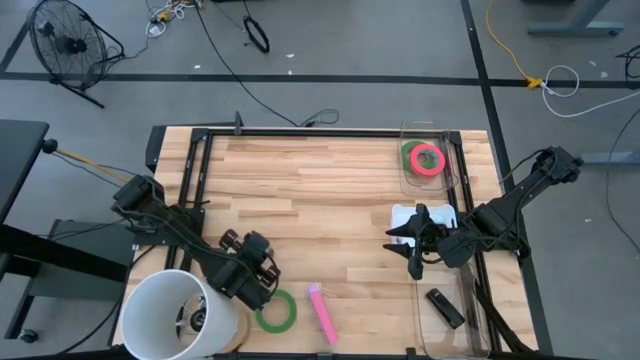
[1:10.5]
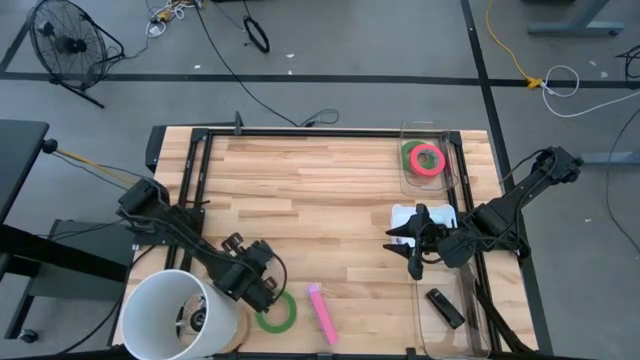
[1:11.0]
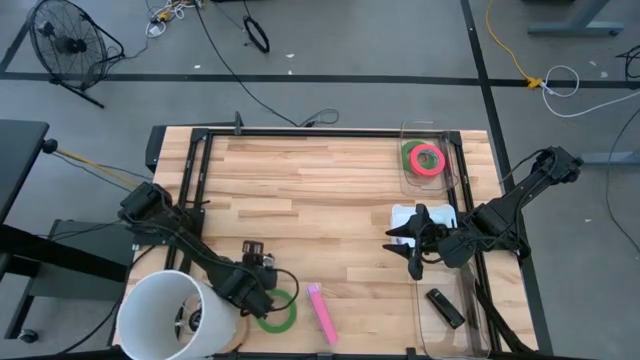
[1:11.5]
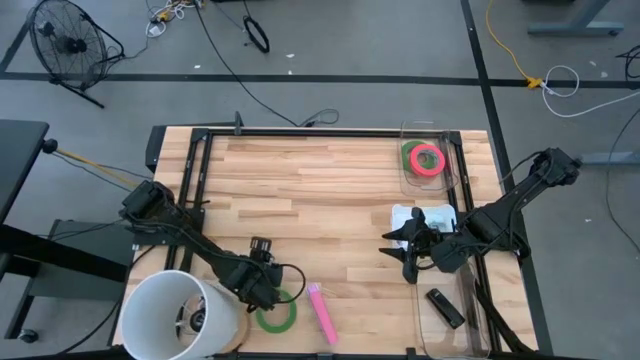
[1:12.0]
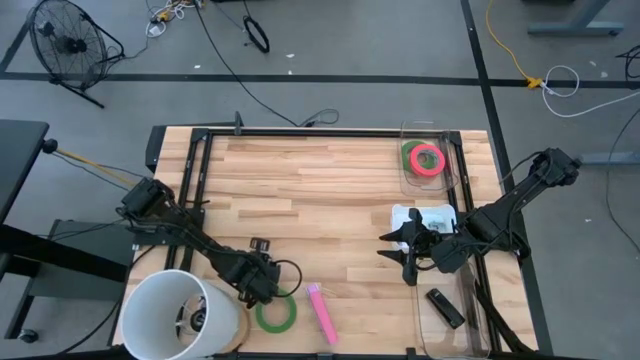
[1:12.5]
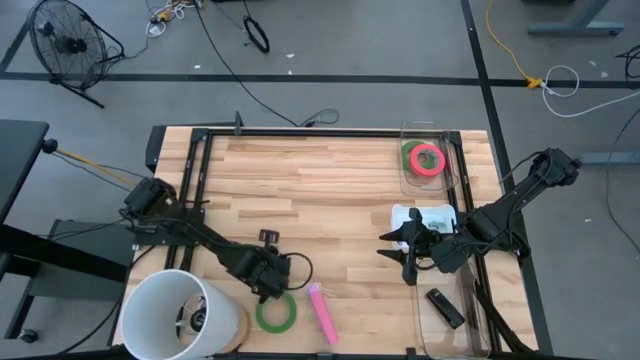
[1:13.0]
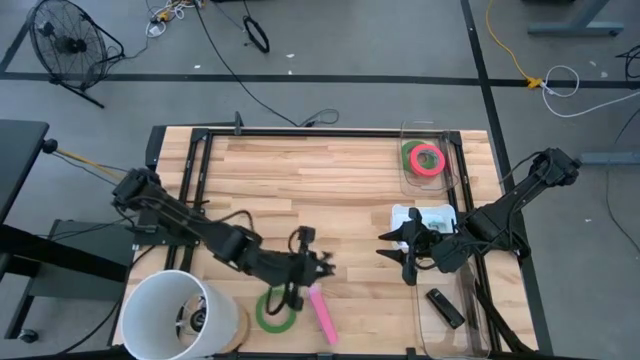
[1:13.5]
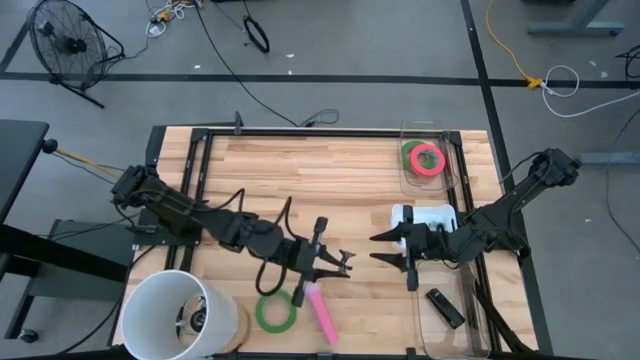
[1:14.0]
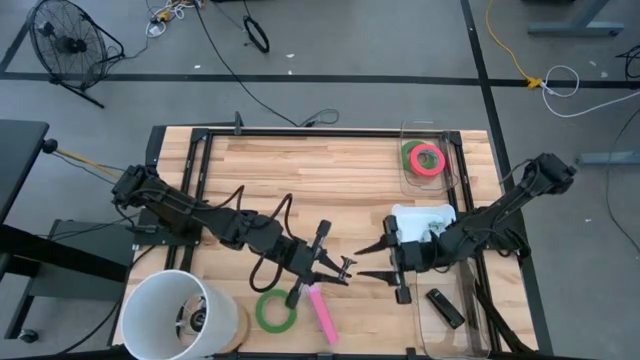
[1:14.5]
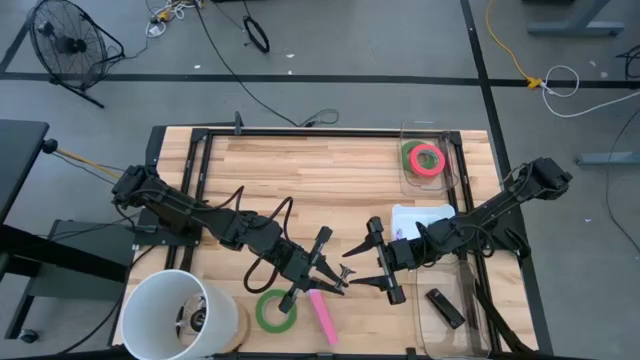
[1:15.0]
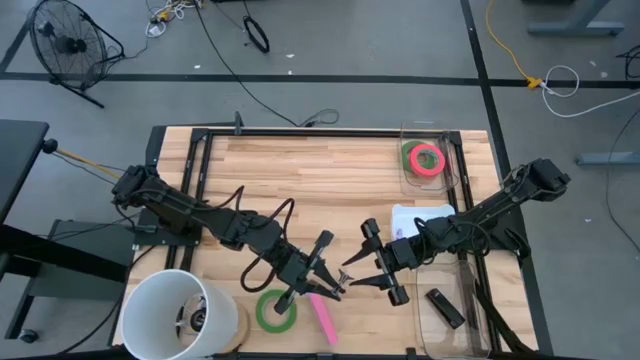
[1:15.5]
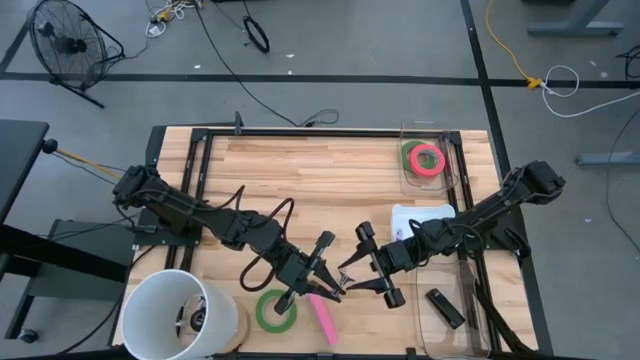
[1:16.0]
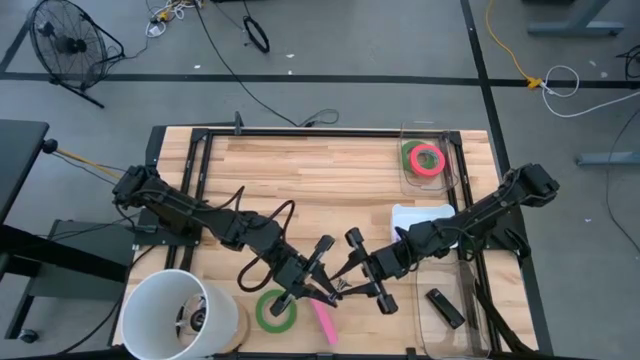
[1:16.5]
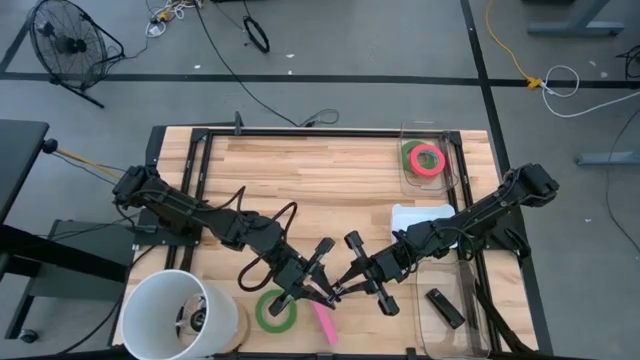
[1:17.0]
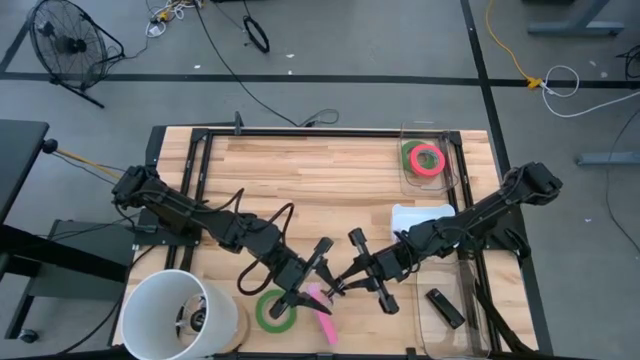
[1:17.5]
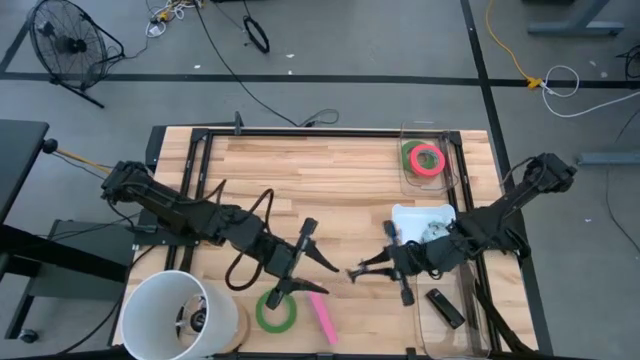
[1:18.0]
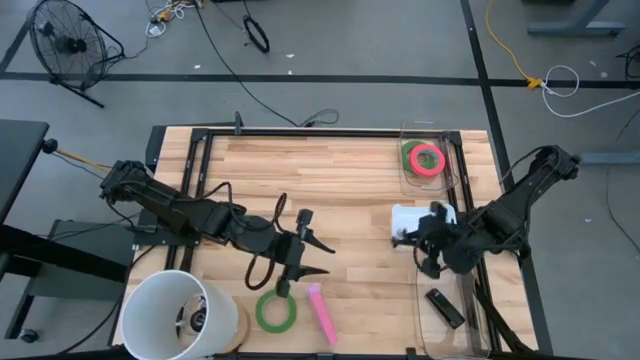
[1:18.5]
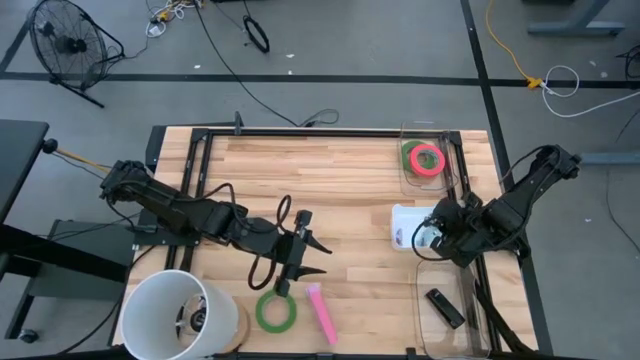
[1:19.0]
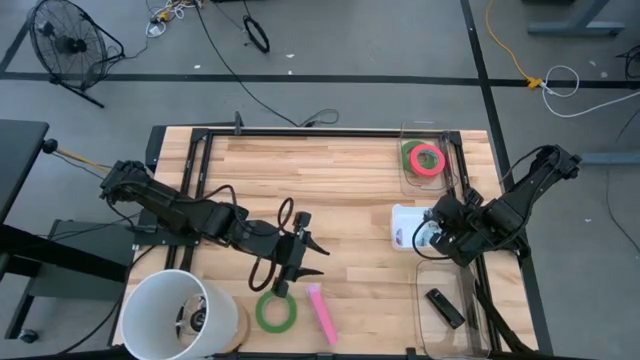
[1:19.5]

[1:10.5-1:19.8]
Task: Pick and place Stapler, Stapler remover, tape
Put the black staple remover into the white bin

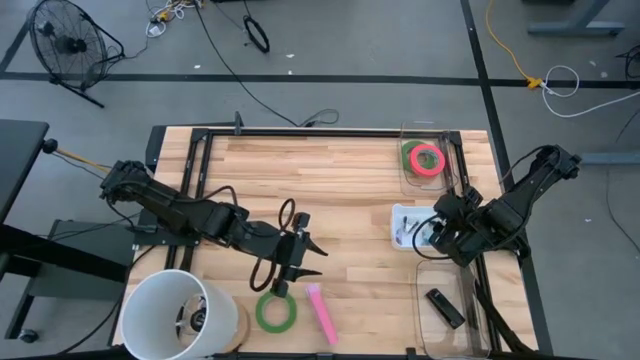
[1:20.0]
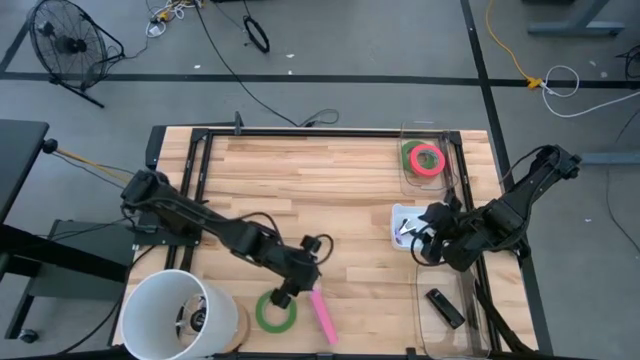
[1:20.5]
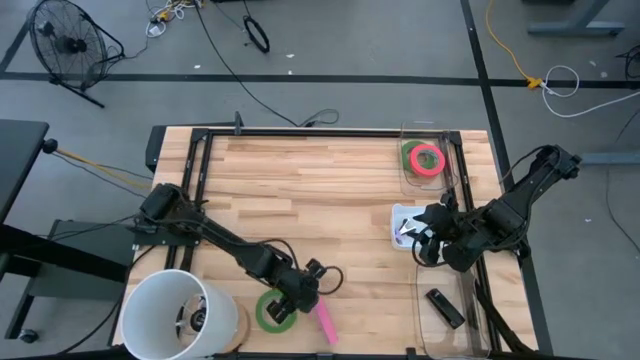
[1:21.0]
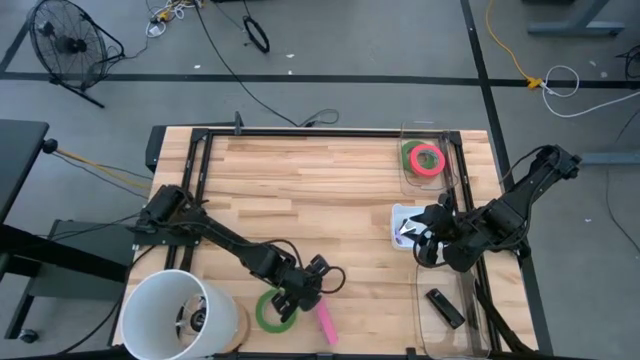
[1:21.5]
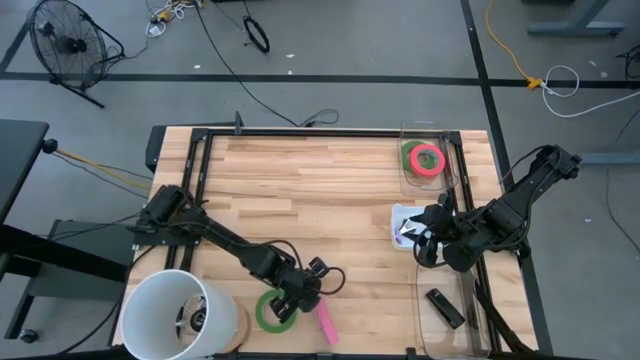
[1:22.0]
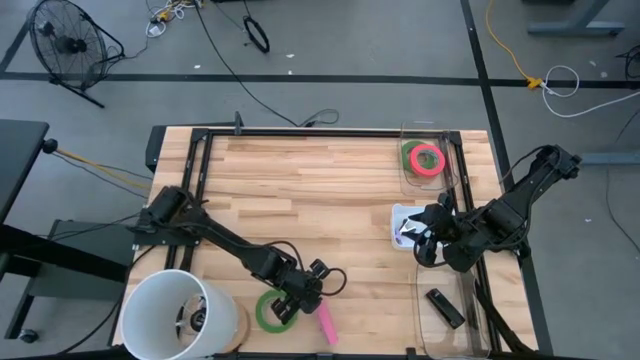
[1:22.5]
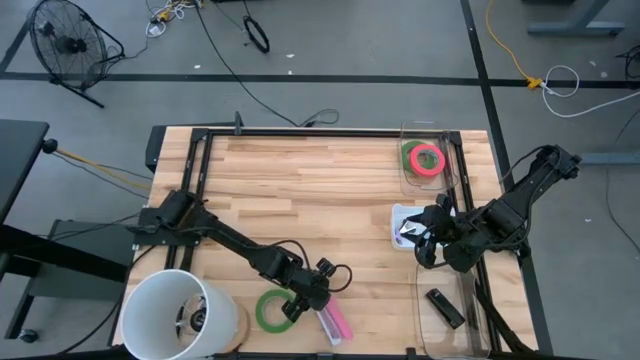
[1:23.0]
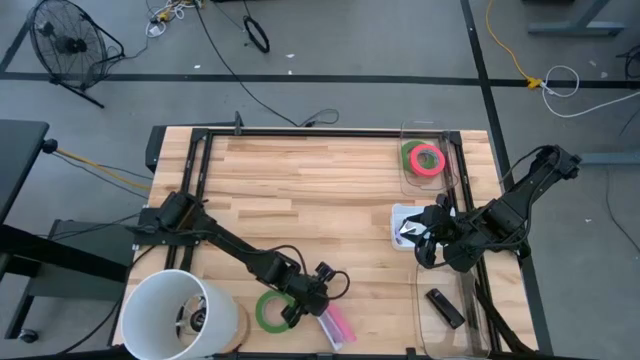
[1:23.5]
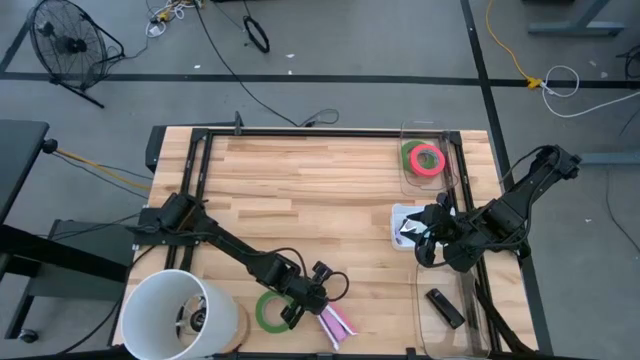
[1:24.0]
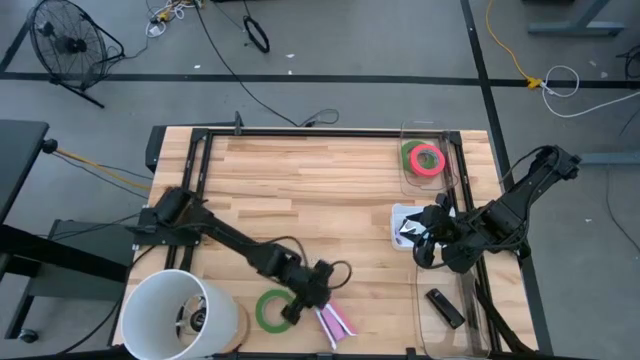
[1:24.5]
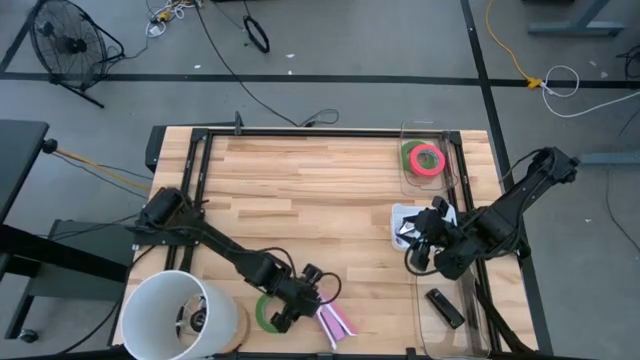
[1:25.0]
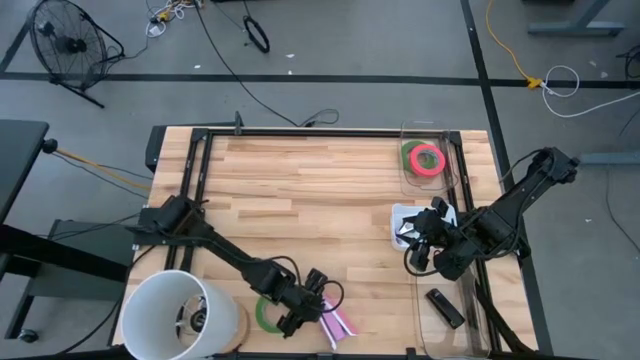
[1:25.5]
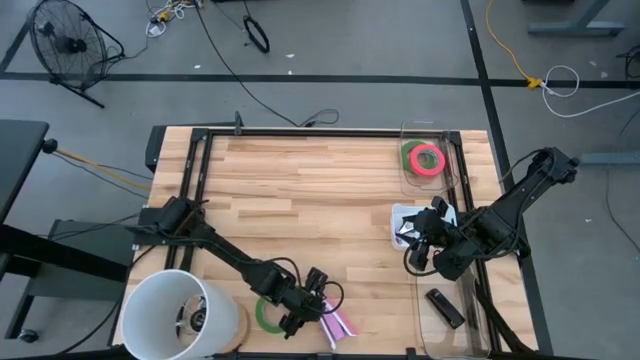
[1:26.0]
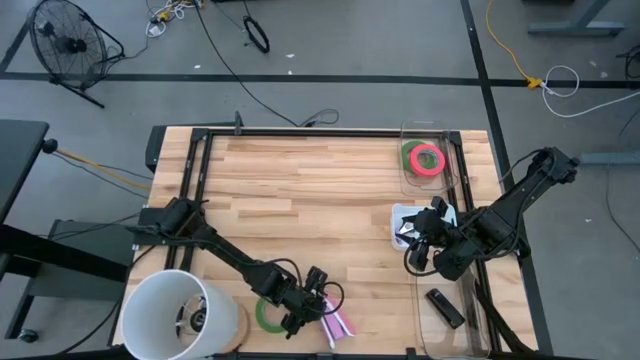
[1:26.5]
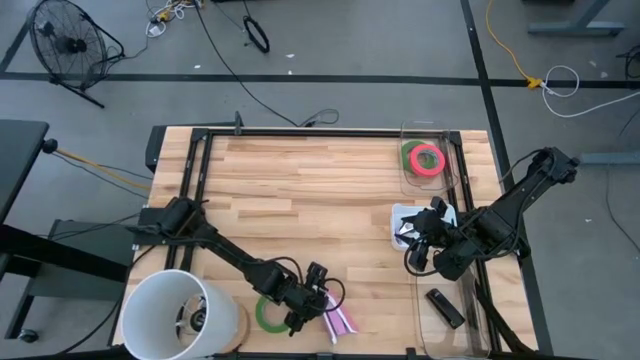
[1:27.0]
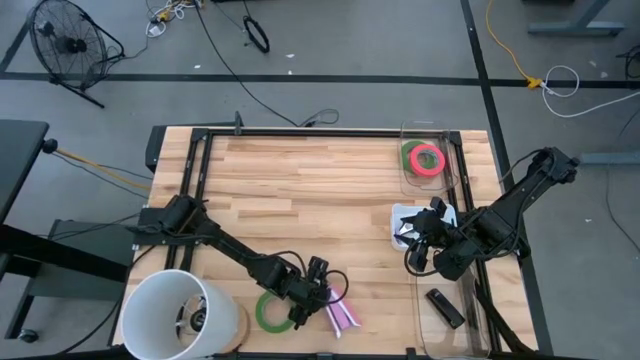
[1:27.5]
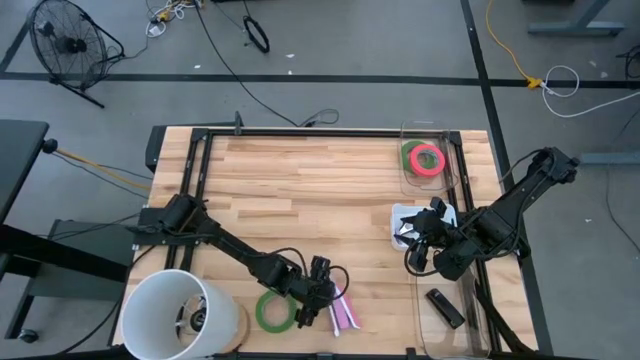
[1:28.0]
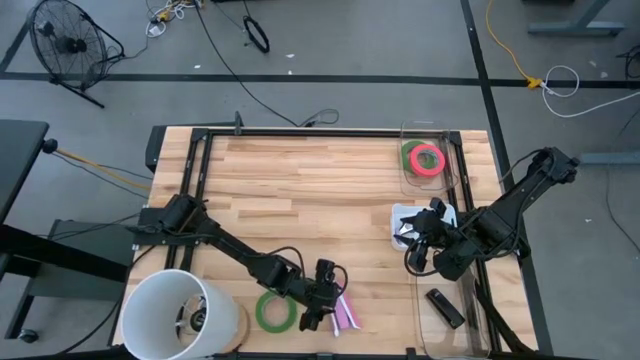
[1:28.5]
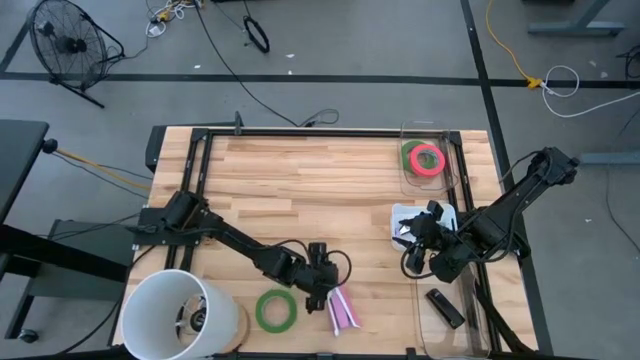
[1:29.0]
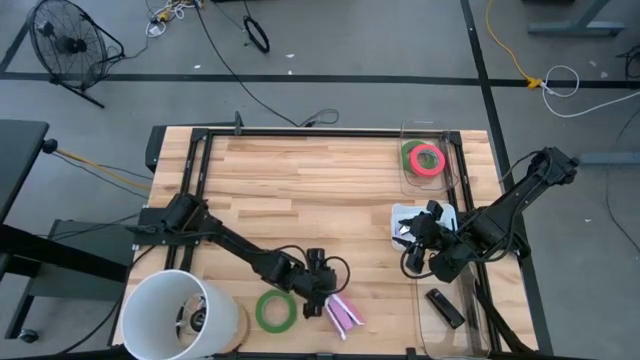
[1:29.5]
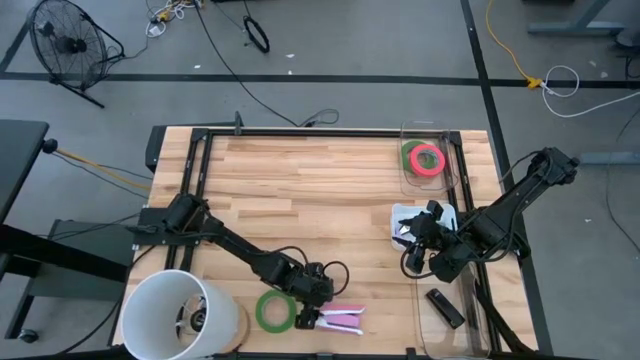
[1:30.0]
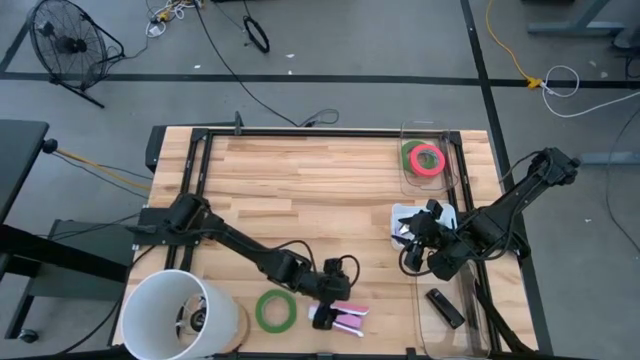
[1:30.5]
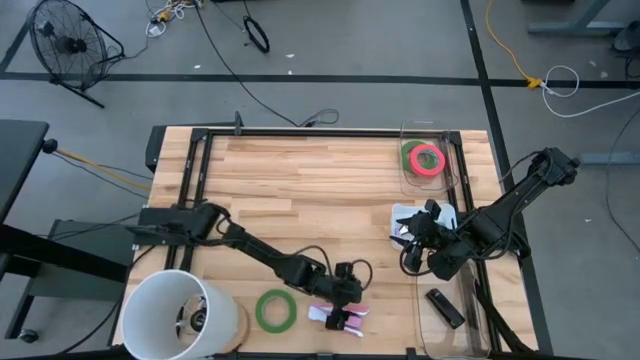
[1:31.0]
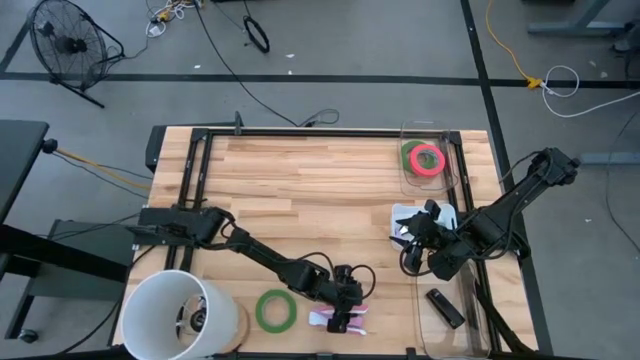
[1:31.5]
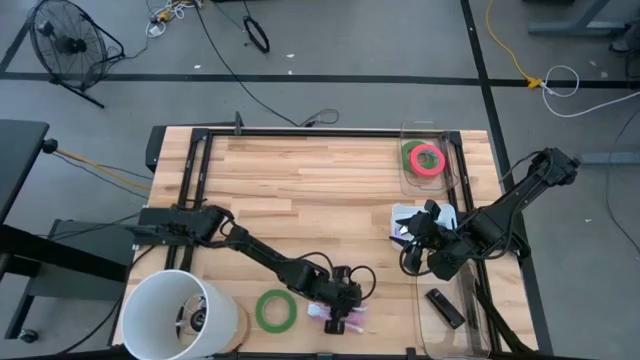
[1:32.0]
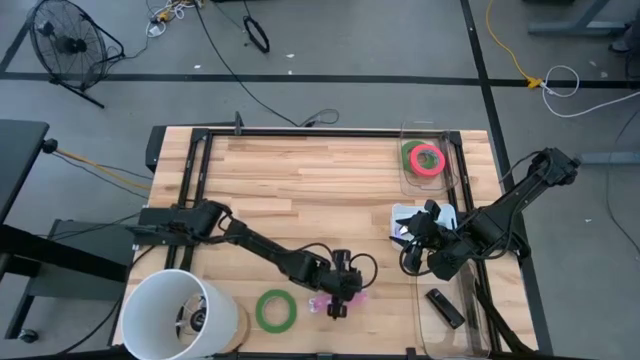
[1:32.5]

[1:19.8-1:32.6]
Put the pink stapler into the bottom transparent bin
